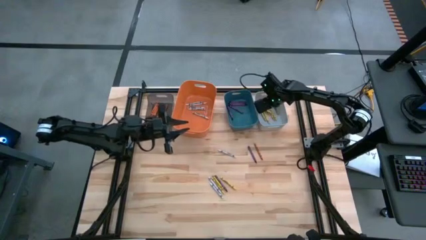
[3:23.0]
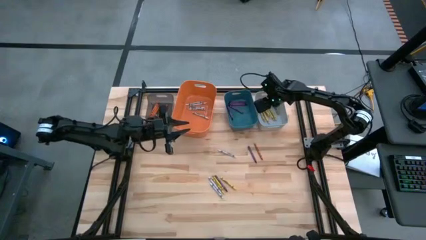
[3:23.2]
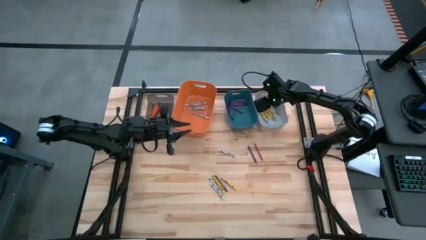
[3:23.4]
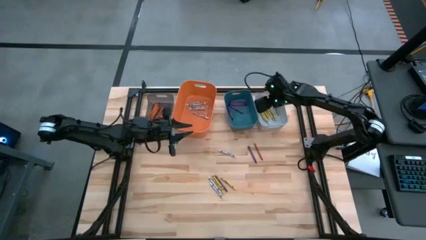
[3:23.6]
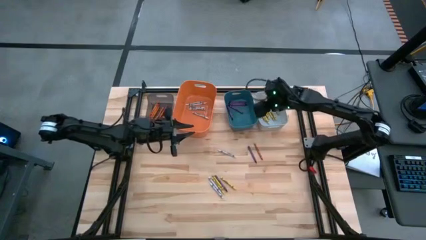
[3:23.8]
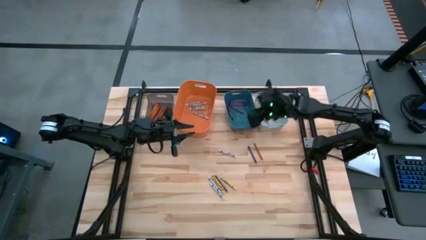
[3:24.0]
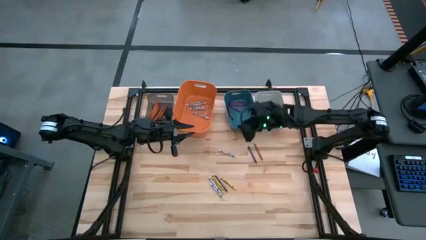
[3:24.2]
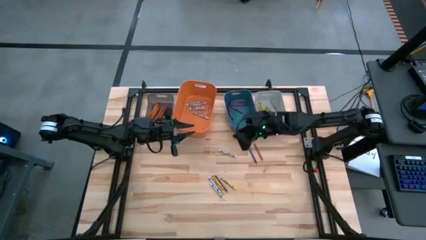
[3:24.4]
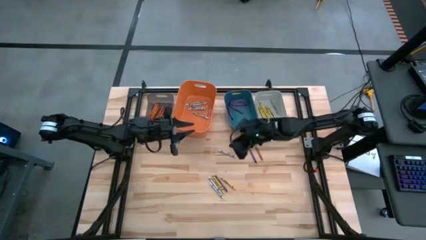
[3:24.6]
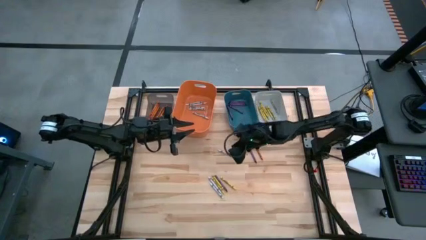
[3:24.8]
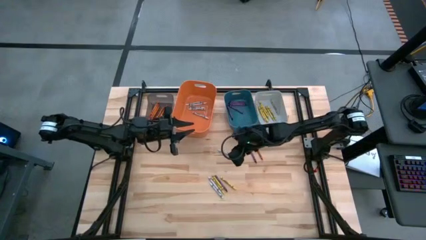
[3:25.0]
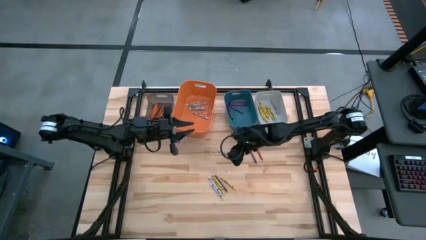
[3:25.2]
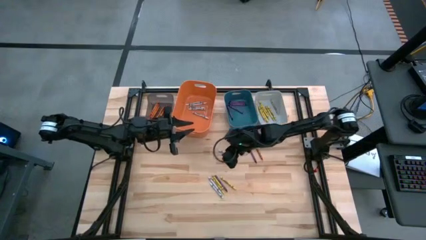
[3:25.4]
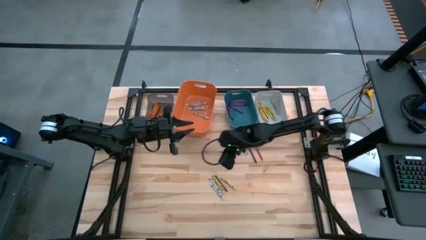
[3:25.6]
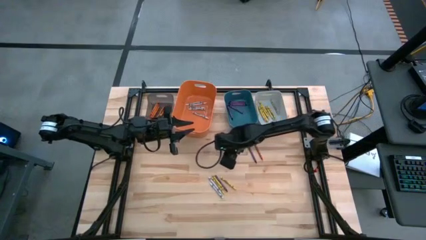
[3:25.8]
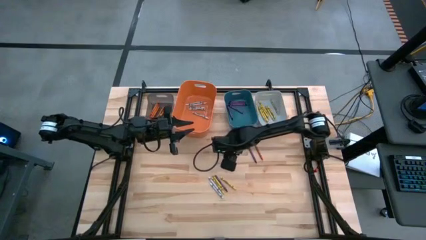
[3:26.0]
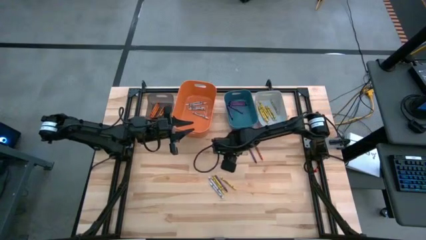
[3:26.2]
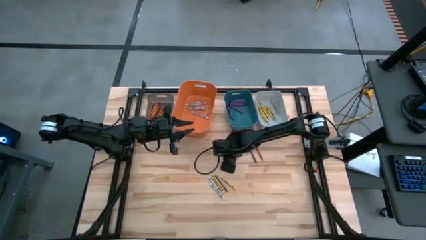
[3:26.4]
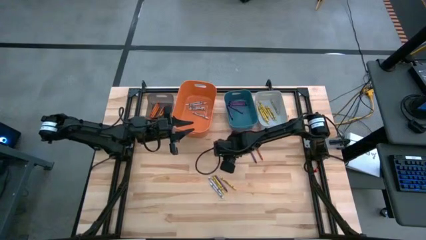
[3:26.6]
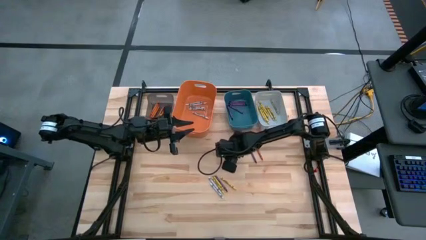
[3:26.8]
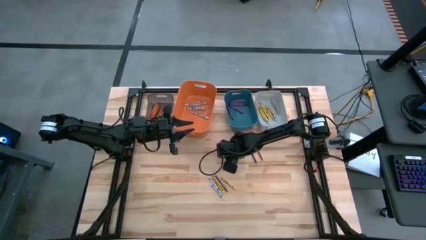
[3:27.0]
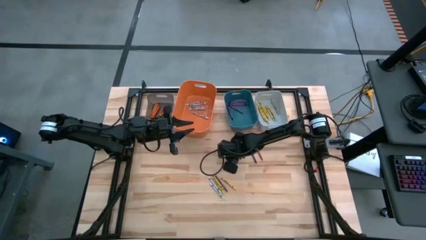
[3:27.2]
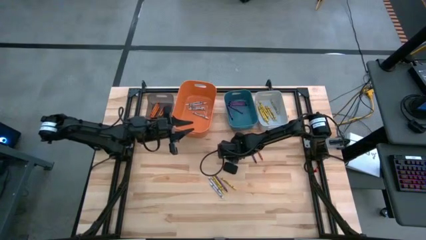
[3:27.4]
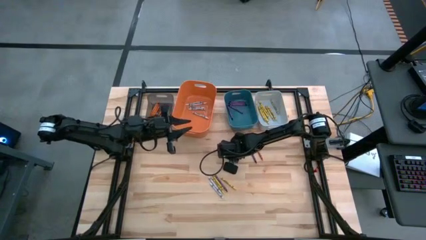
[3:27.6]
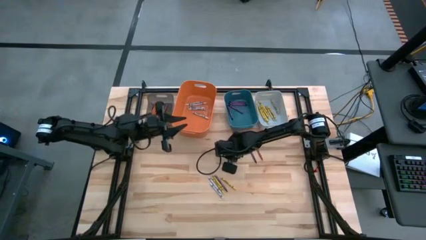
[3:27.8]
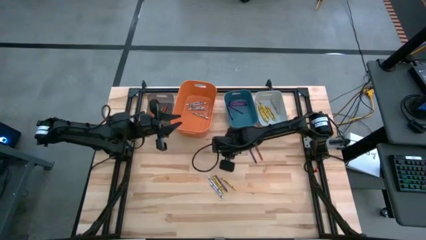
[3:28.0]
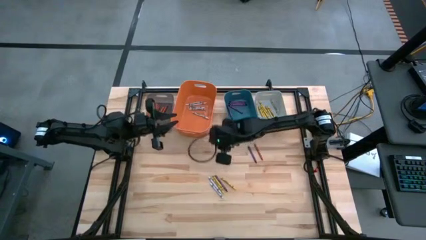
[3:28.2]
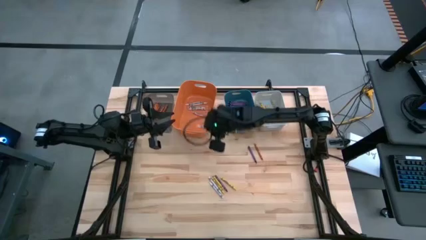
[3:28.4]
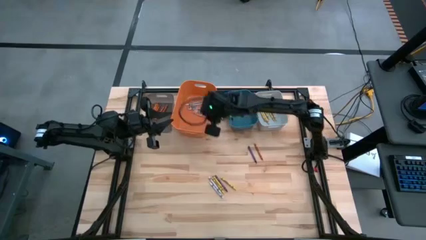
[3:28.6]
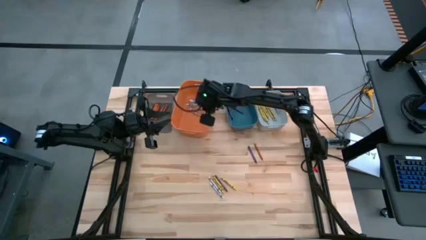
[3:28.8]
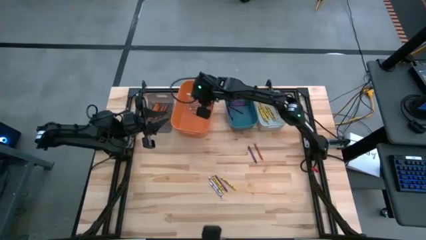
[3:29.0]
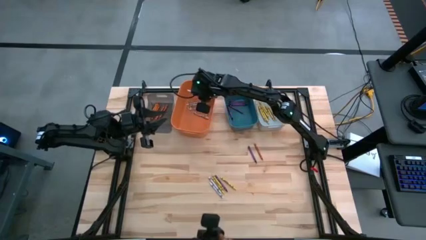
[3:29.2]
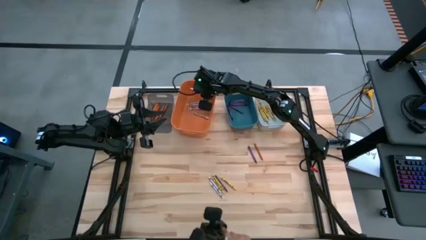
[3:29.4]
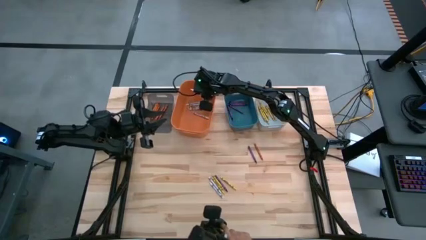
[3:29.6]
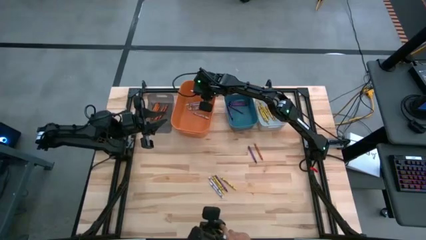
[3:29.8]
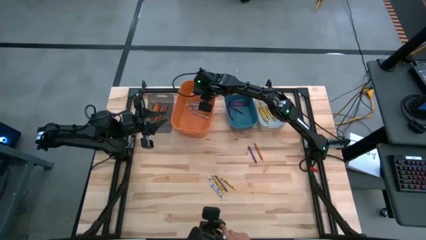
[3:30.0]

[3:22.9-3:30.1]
Task: Sort crayons
Put the white crayon into the orange bin

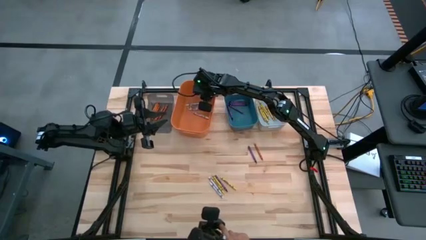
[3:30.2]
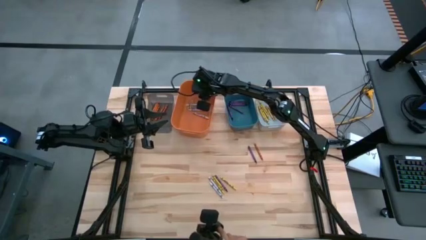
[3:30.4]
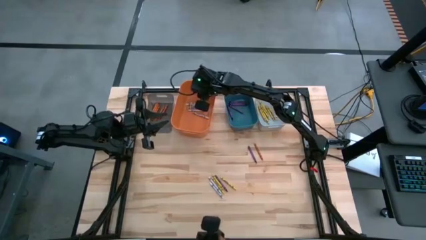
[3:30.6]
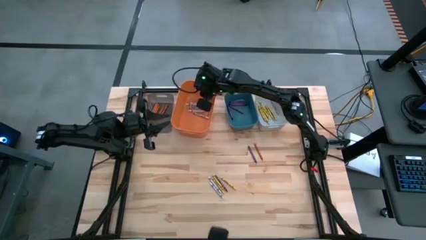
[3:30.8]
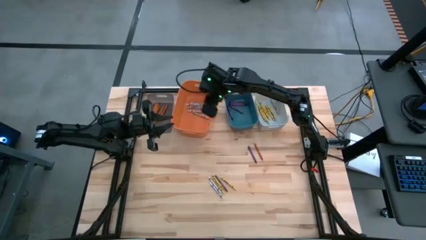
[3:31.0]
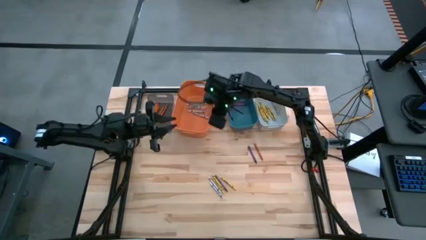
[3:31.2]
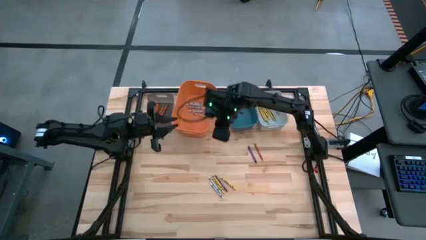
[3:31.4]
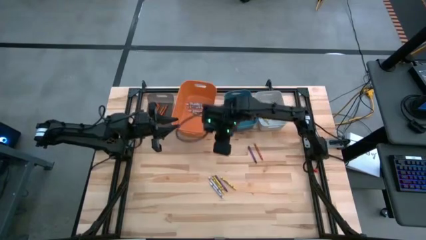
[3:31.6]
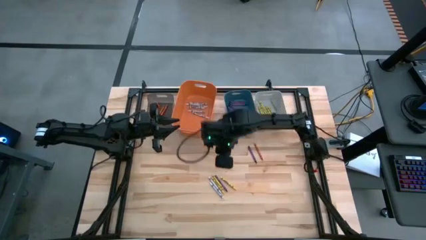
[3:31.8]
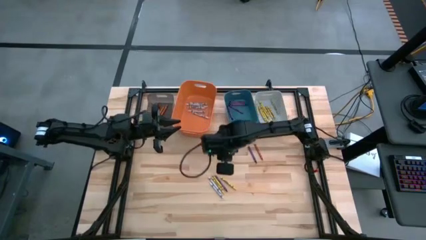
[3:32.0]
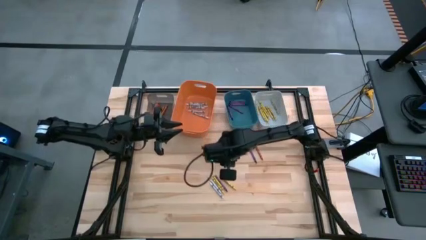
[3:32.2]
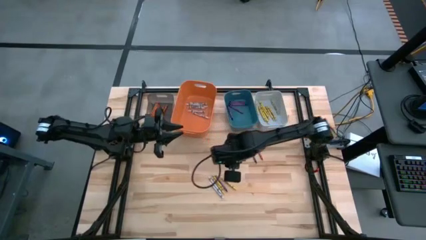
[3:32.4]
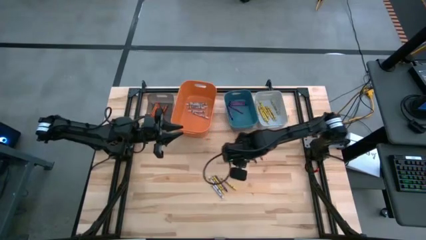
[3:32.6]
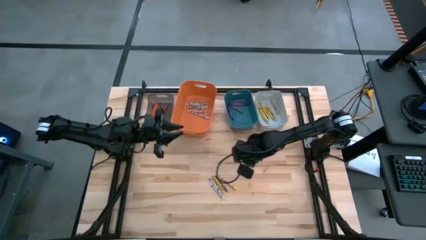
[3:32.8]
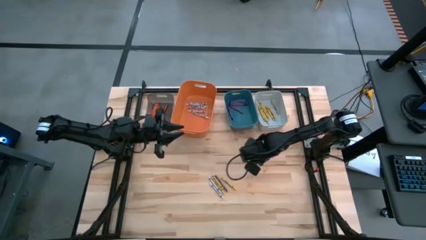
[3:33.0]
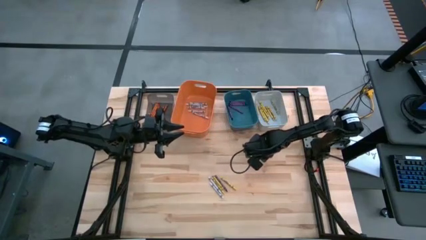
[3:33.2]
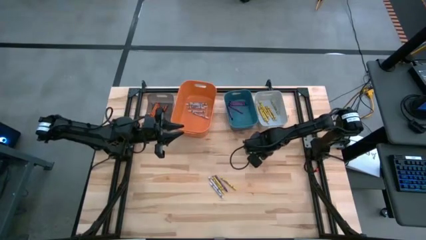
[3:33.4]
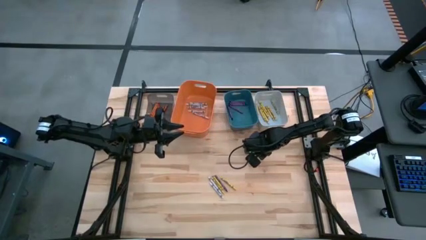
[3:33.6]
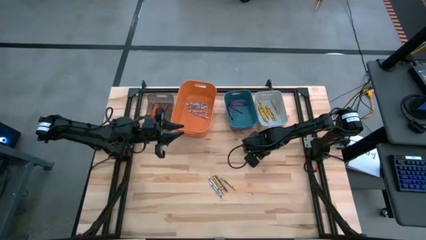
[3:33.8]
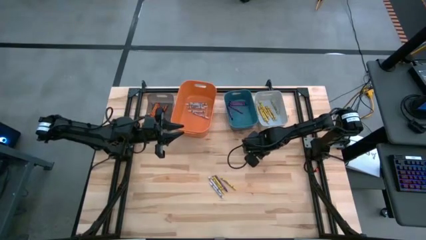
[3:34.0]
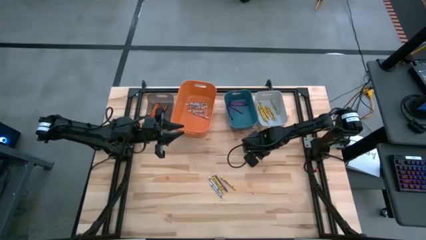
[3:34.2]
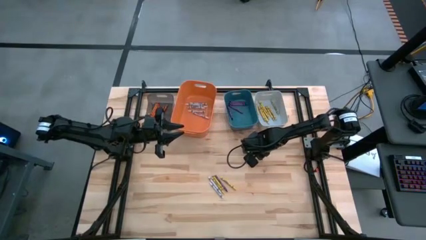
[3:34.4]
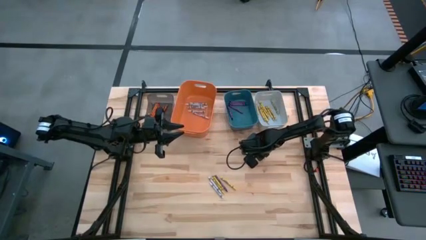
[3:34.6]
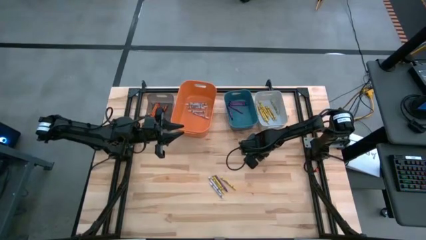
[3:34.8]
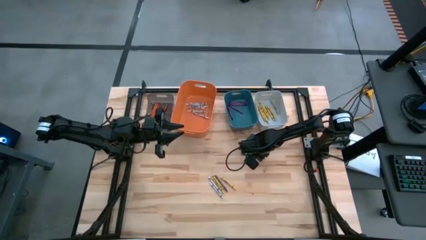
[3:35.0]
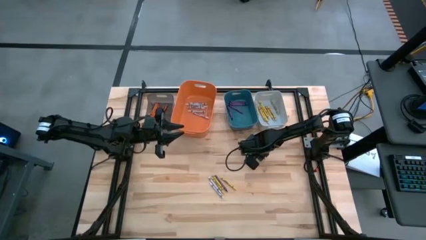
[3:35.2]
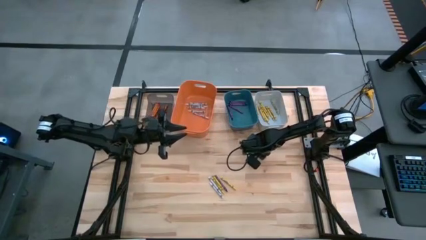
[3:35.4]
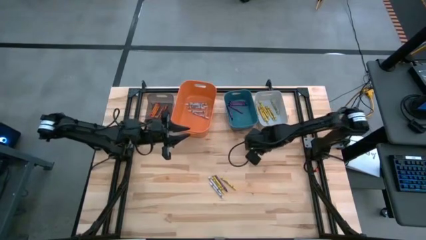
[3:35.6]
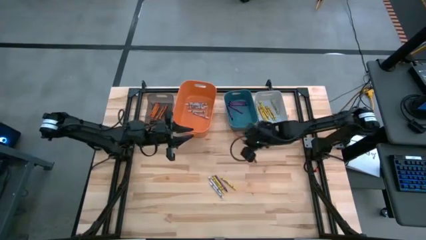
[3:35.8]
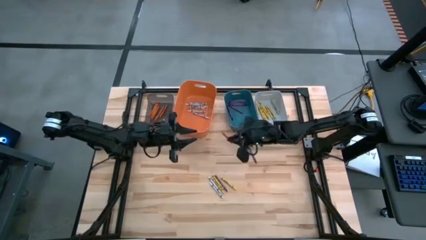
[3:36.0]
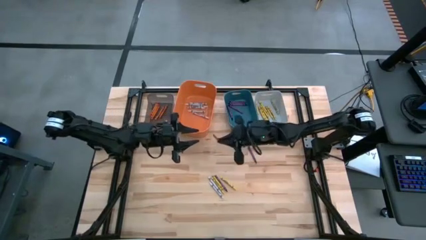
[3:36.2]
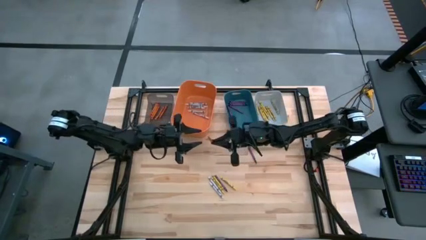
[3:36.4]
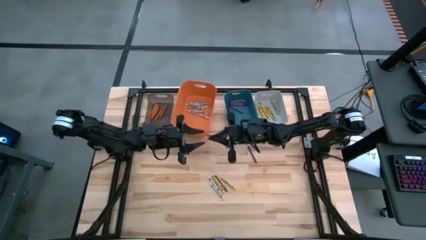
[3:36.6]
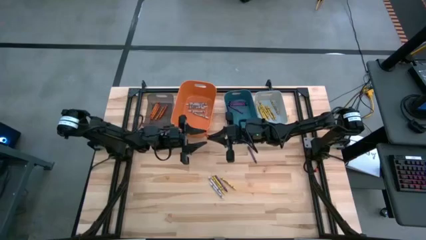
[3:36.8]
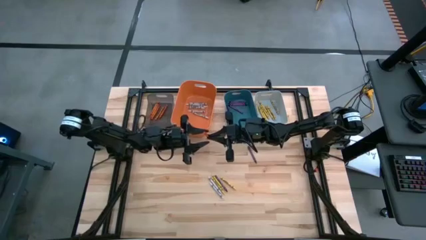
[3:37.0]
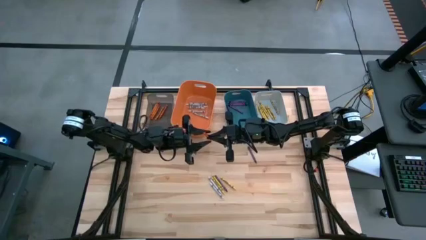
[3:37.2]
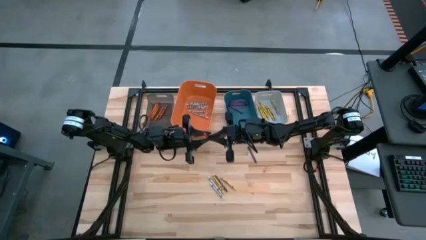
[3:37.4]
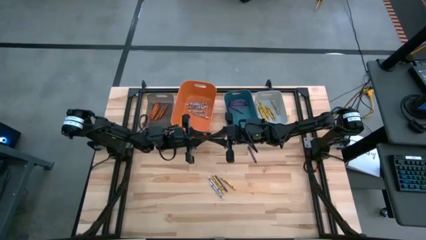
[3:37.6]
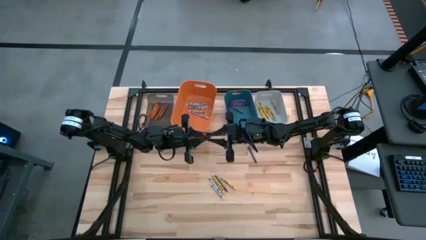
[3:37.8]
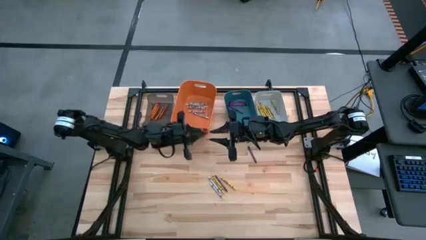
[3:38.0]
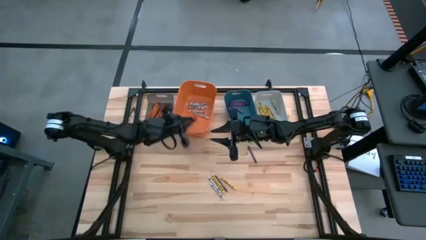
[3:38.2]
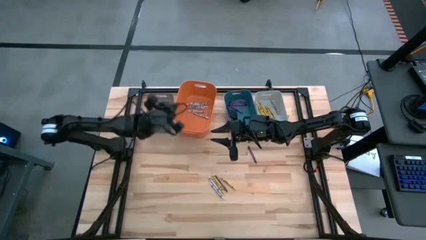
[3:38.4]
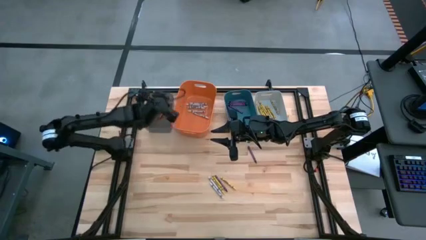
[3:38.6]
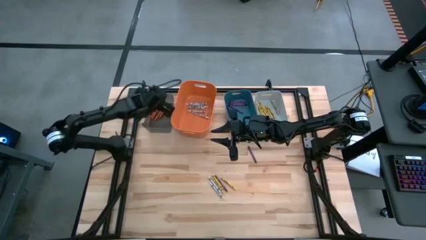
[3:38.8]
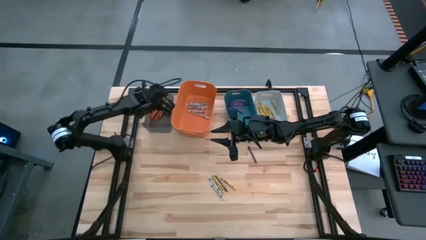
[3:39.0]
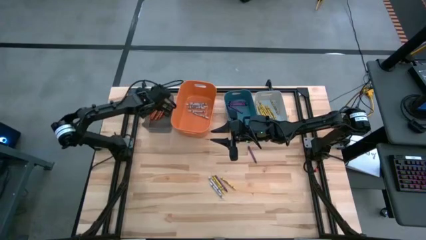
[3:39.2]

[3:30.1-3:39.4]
Put the orange crayon into the black bin
